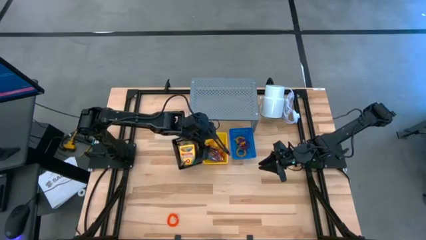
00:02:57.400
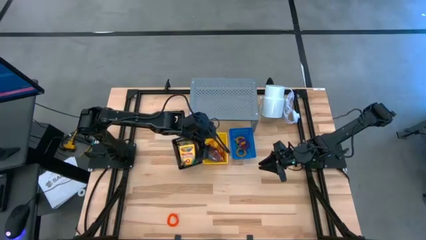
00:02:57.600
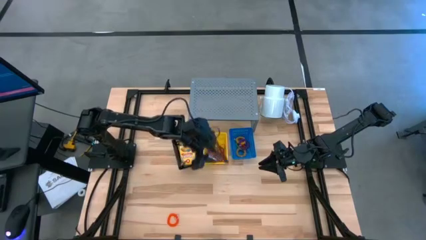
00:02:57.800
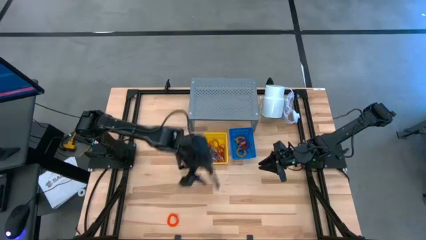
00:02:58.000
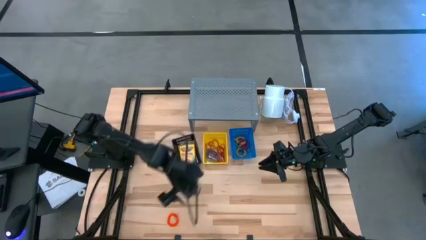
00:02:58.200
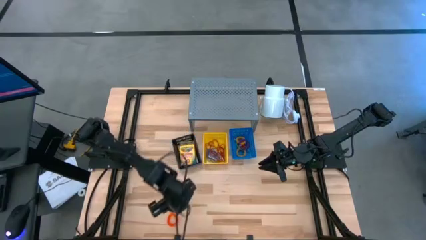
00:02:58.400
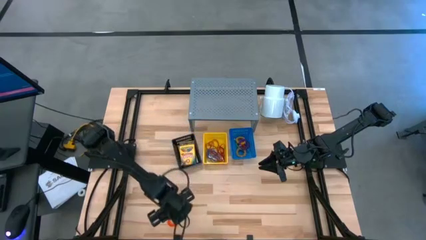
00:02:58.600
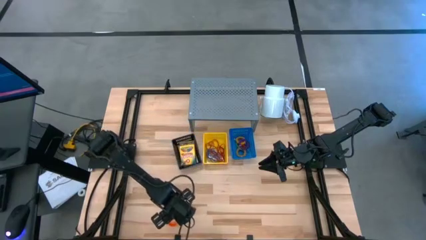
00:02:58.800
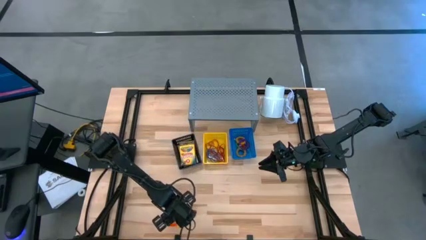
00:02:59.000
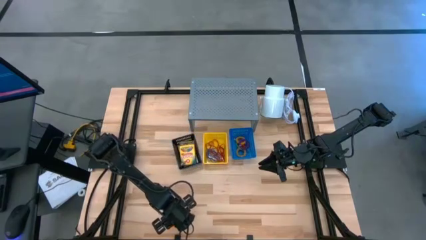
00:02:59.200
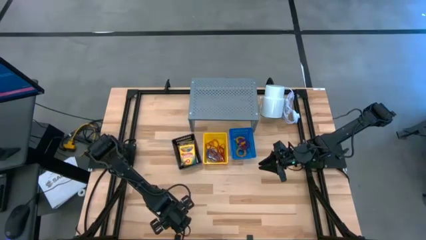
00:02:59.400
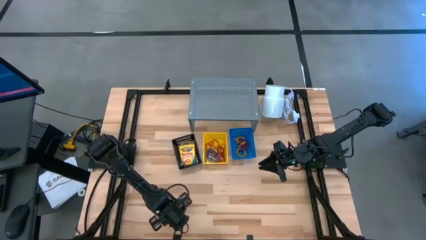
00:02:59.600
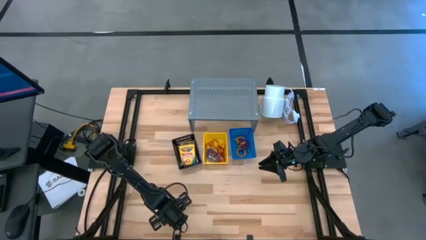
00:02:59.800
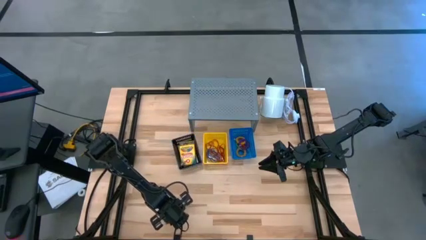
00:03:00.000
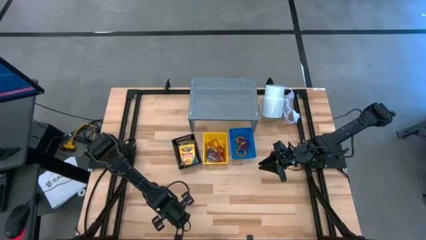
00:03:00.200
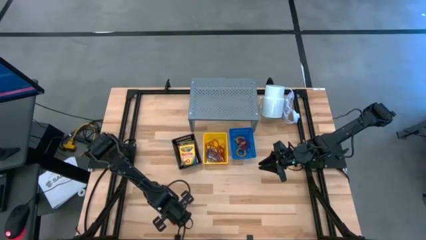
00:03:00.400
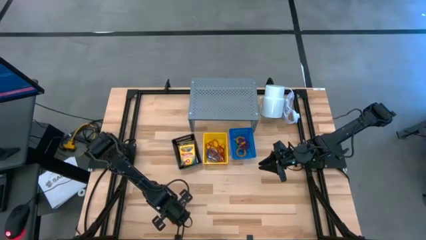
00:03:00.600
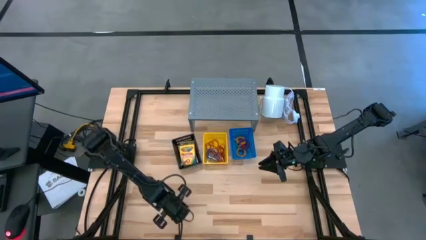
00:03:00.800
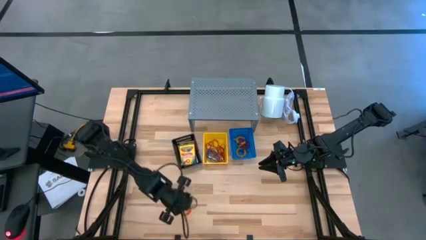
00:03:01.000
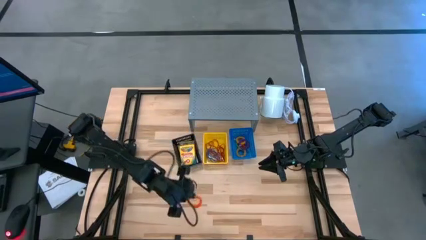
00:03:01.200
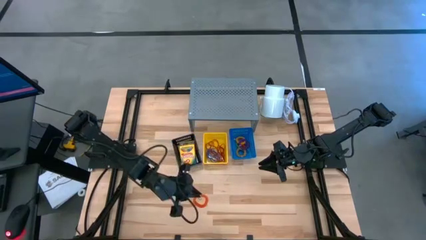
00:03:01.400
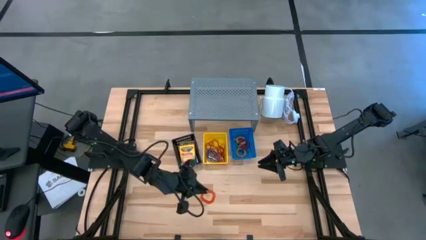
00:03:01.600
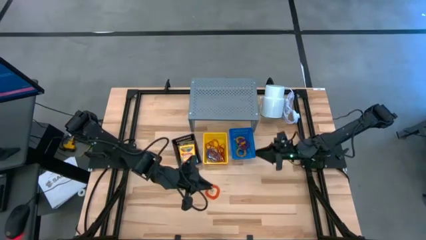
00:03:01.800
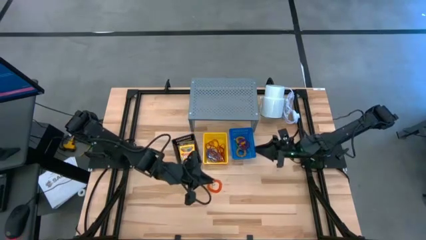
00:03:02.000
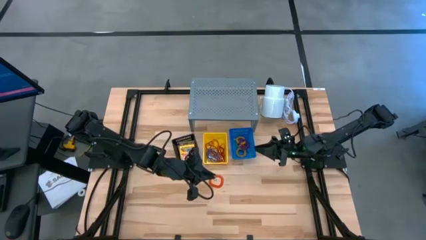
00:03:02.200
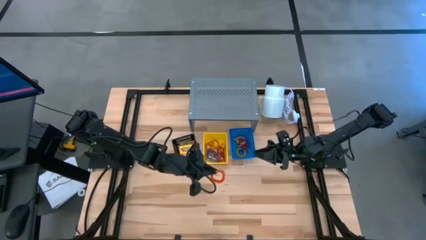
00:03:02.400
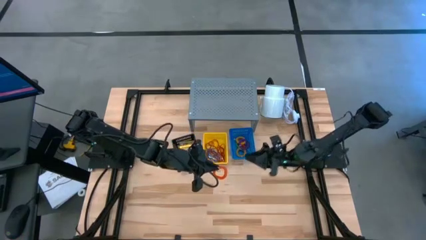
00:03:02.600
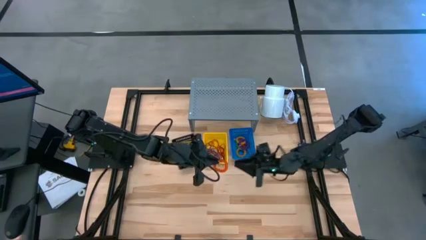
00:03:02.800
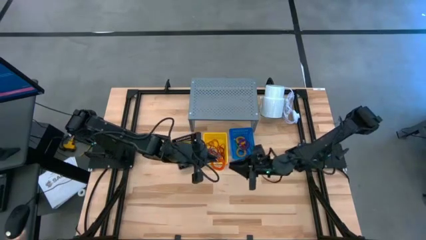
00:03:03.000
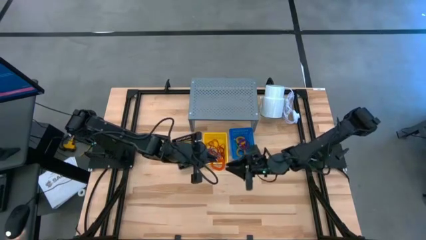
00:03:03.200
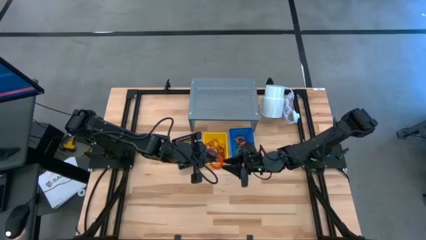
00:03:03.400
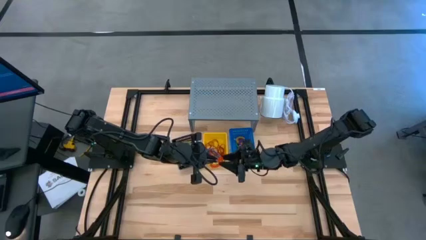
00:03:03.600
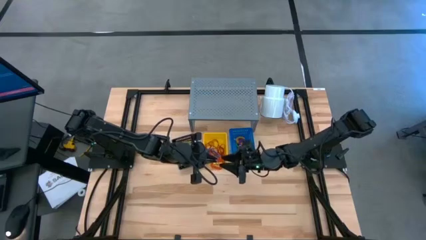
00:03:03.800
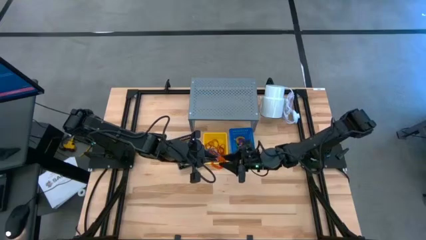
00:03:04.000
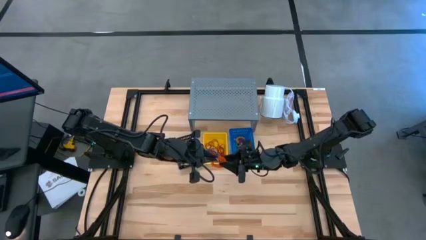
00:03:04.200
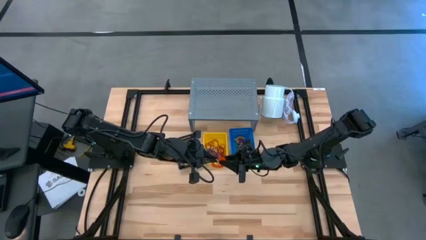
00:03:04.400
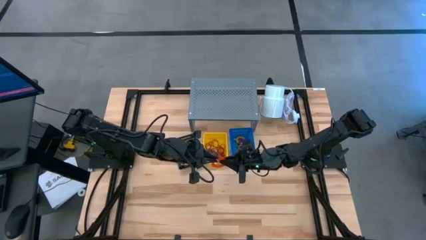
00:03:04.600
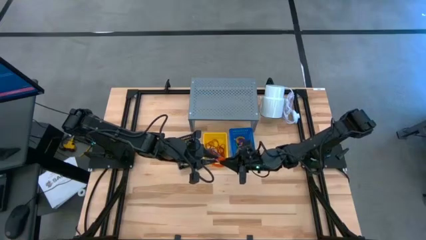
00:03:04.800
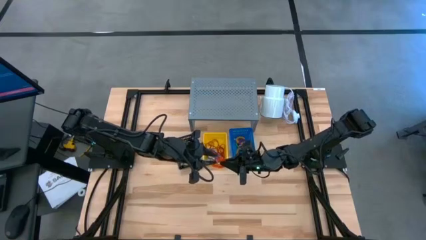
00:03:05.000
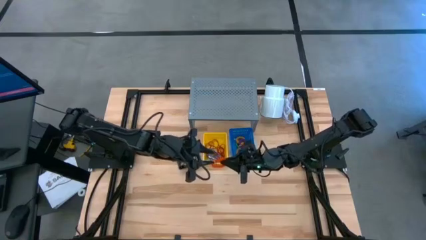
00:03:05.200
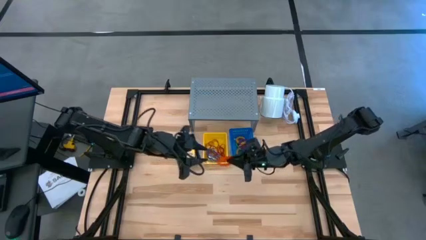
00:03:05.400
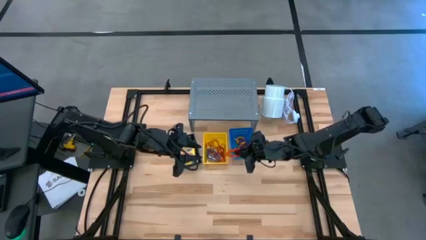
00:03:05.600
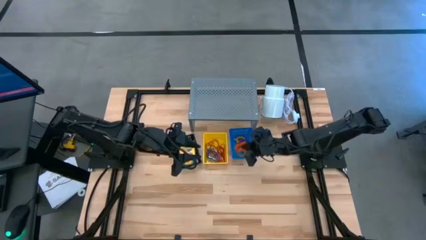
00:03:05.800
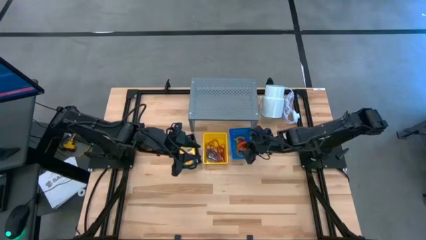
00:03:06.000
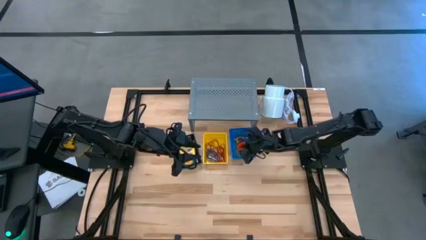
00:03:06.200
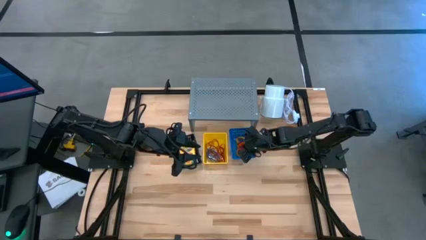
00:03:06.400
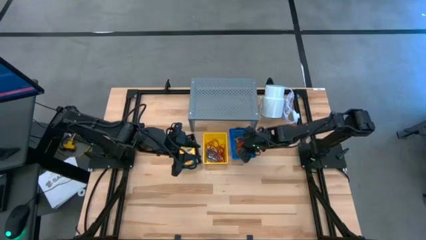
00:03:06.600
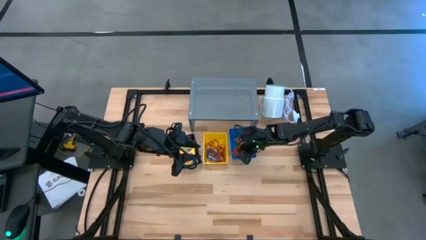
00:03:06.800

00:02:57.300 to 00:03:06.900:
Task: Pick & Place Office Desk Supplies
Put the orange spring keychain into the blue basket

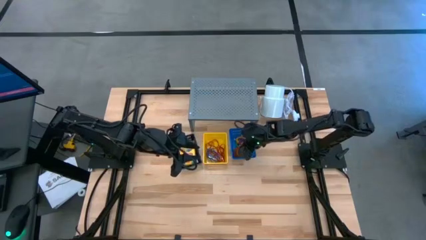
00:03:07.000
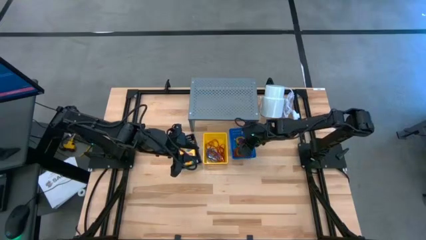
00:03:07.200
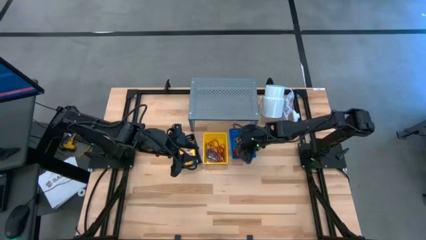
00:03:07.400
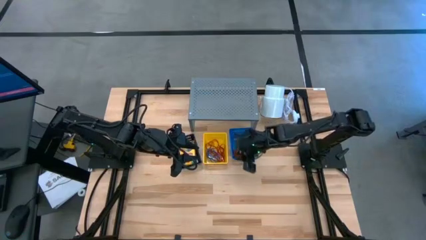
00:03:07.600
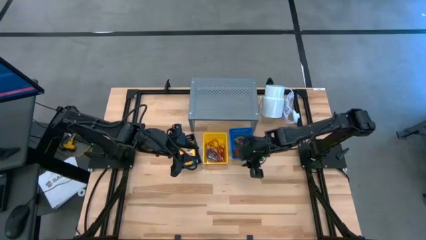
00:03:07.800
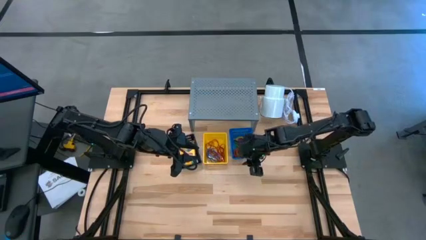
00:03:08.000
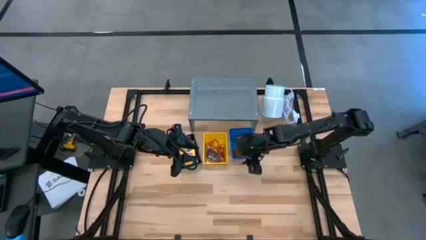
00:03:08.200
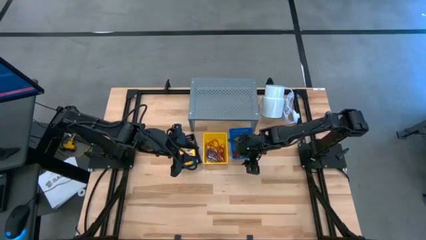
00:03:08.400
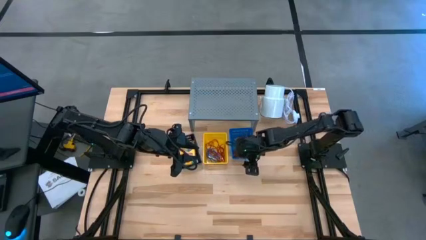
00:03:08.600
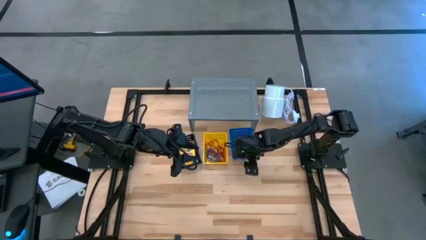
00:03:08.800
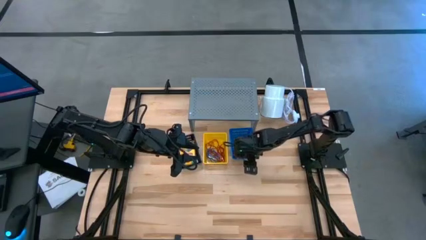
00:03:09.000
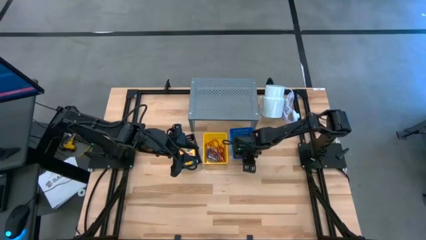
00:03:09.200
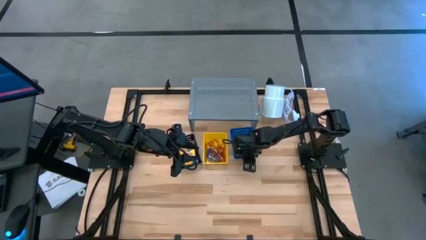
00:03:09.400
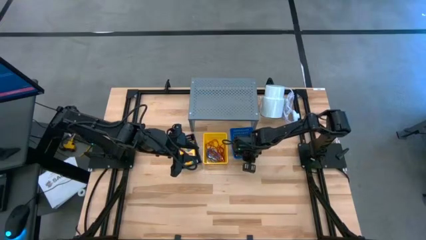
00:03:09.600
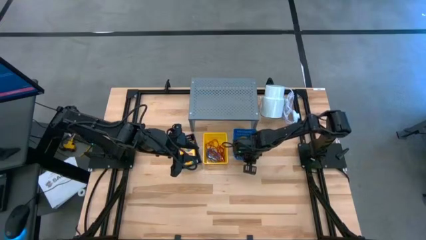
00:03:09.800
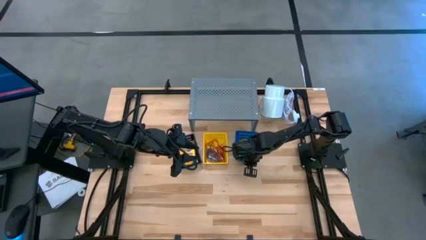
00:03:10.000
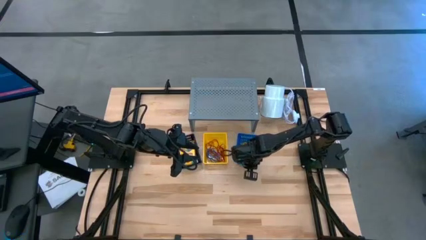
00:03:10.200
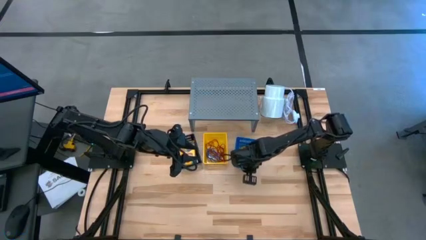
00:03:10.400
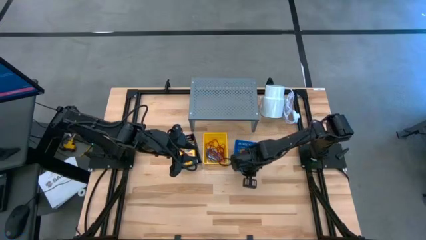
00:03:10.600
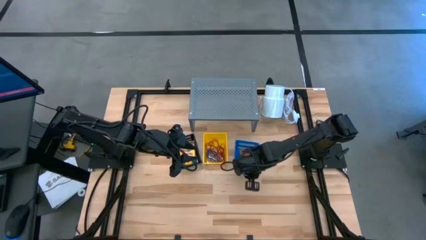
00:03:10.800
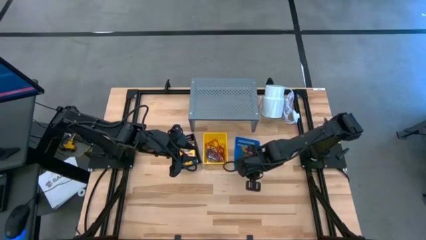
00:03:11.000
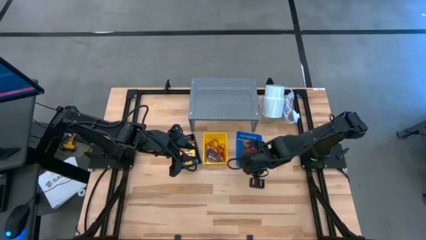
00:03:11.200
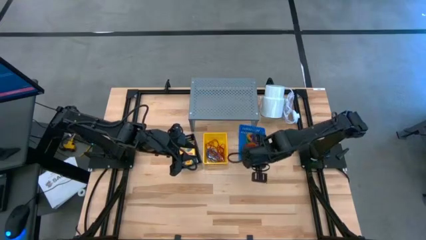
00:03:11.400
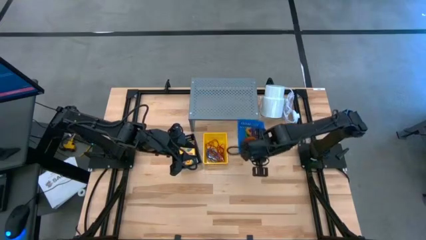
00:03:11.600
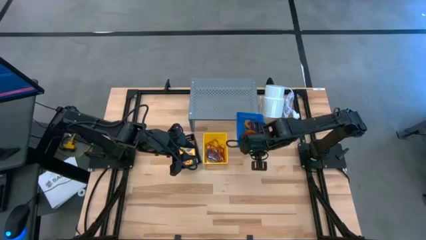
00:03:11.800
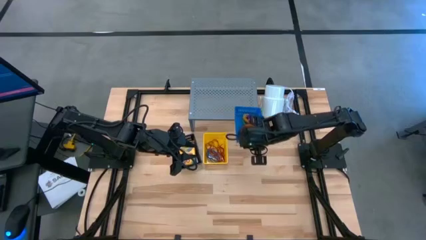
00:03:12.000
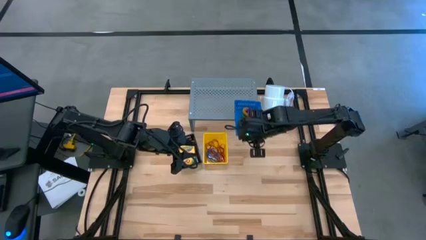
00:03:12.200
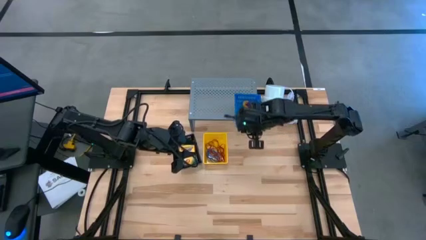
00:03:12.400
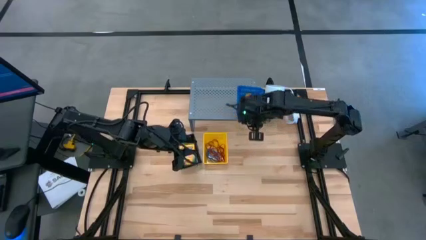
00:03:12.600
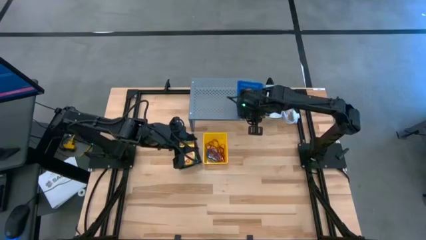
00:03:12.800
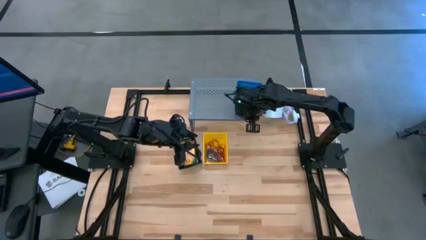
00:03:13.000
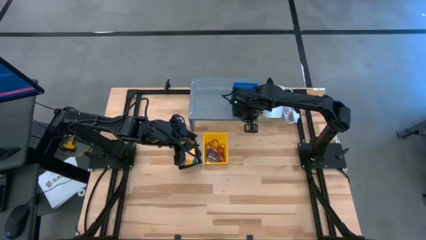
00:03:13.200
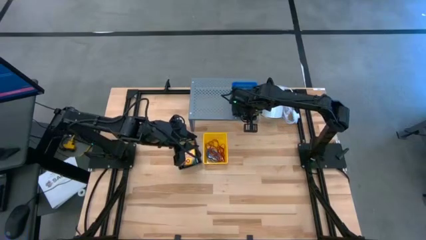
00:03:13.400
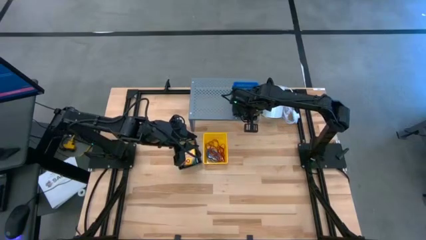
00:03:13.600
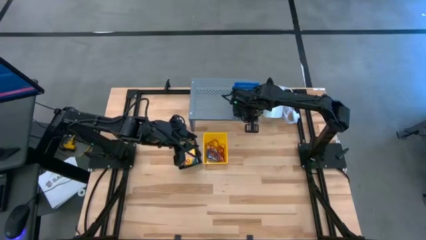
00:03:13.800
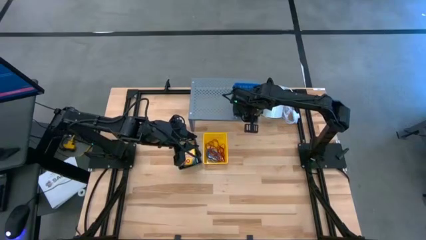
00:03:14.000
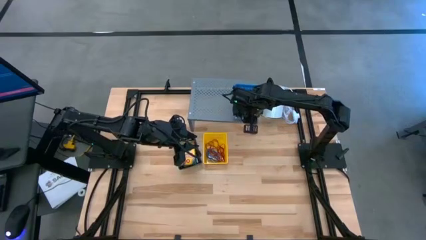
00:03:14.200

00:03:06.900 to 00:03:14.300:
Put the blue basket on the shelf
